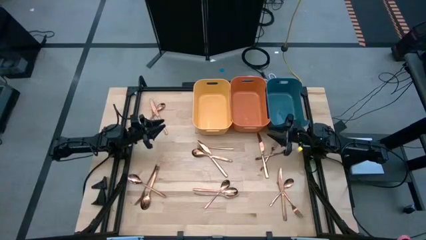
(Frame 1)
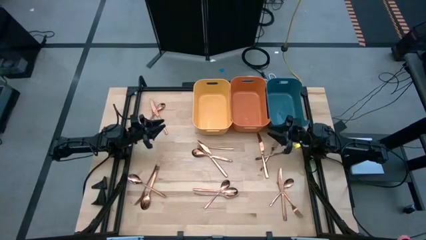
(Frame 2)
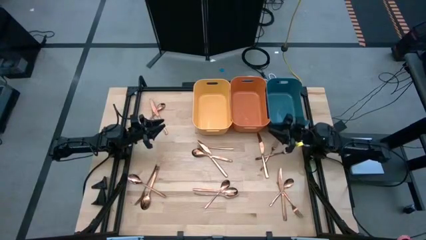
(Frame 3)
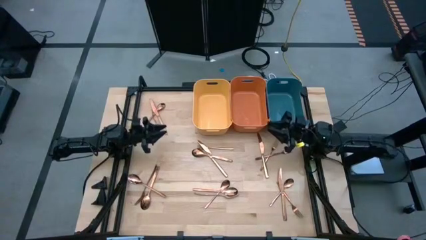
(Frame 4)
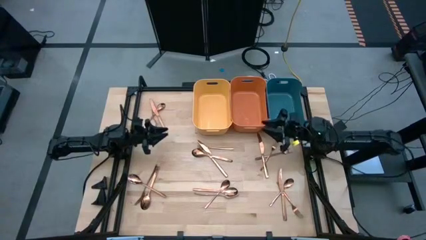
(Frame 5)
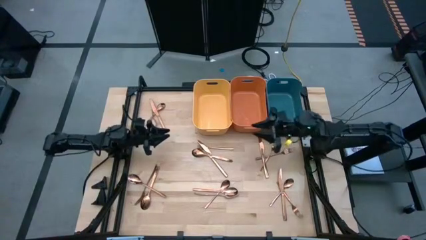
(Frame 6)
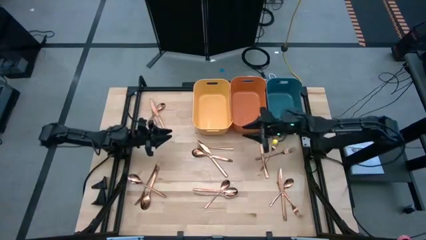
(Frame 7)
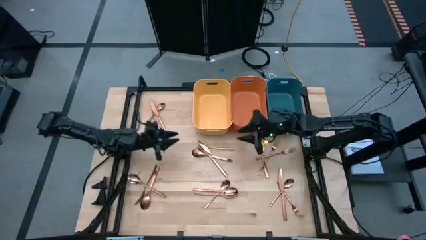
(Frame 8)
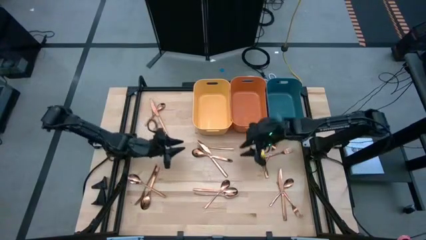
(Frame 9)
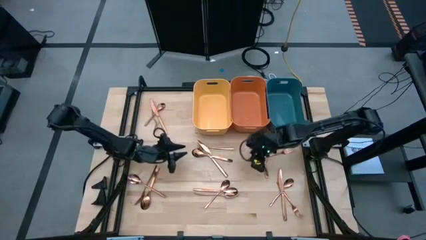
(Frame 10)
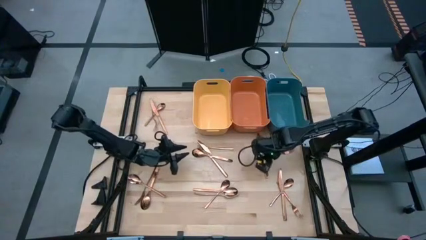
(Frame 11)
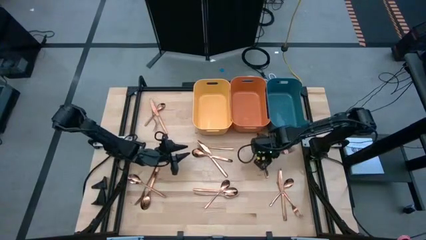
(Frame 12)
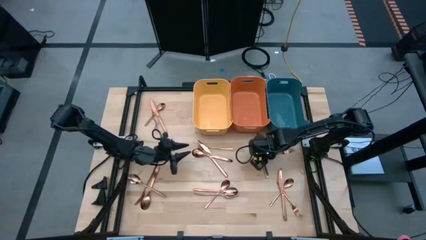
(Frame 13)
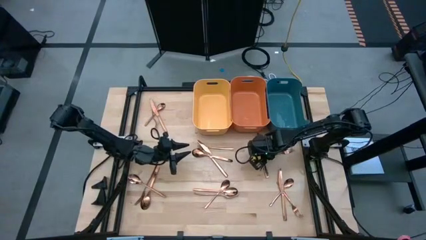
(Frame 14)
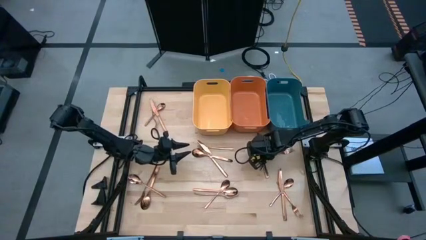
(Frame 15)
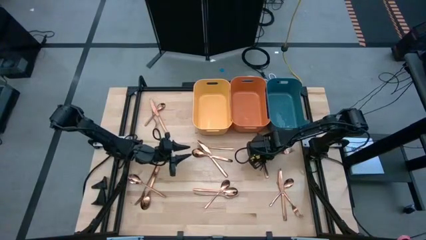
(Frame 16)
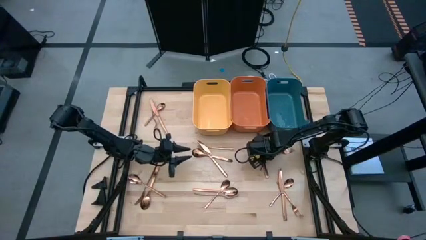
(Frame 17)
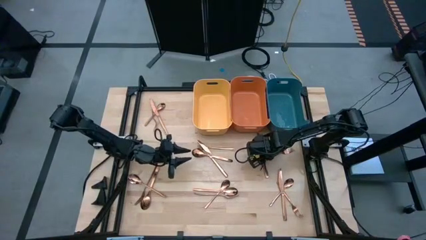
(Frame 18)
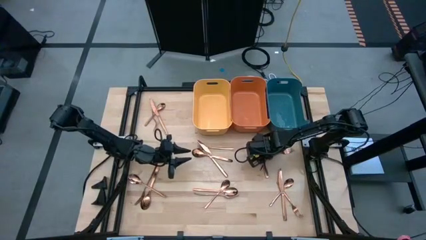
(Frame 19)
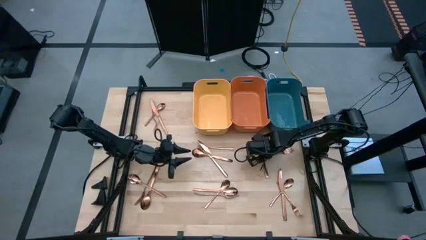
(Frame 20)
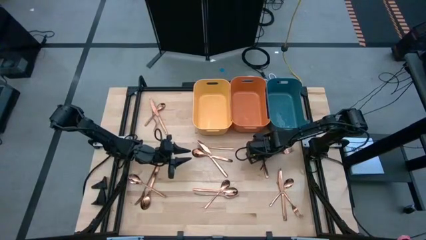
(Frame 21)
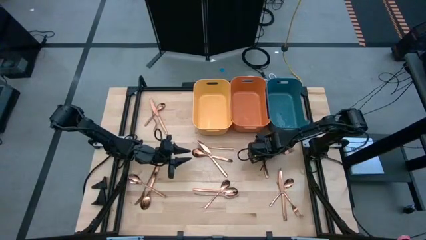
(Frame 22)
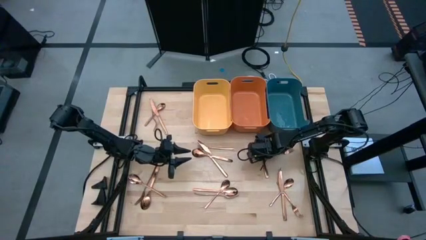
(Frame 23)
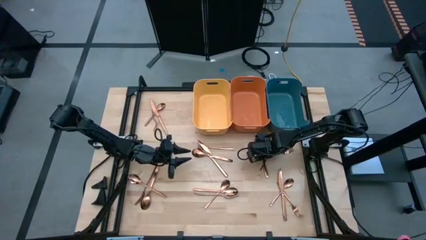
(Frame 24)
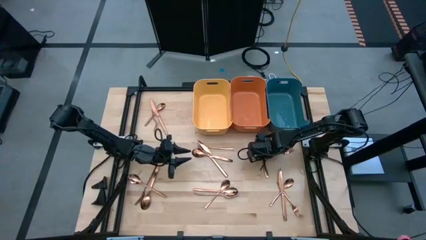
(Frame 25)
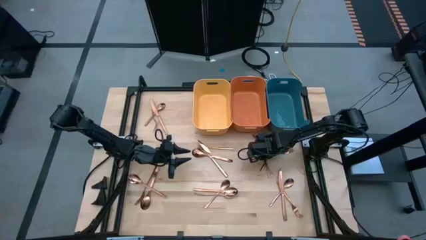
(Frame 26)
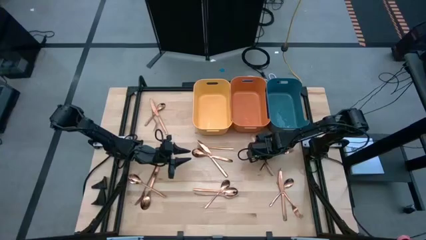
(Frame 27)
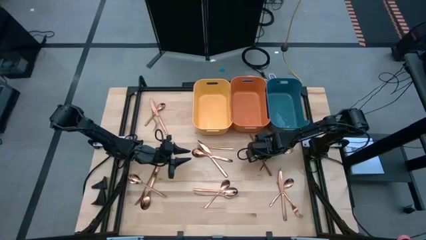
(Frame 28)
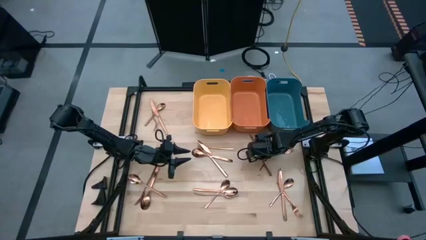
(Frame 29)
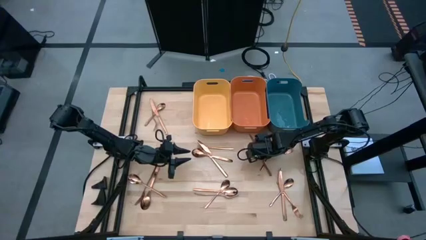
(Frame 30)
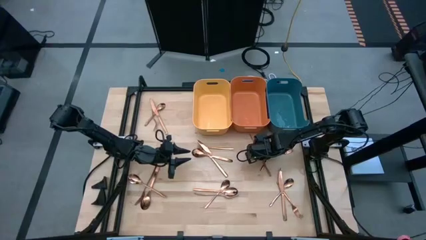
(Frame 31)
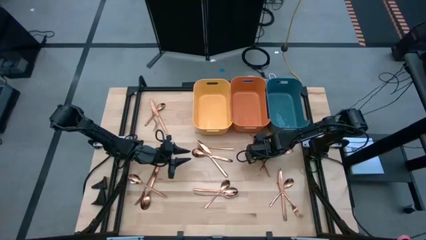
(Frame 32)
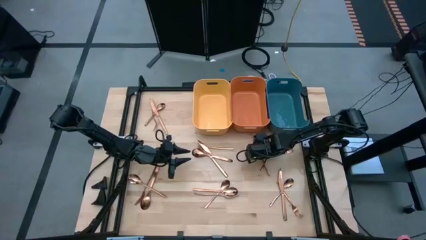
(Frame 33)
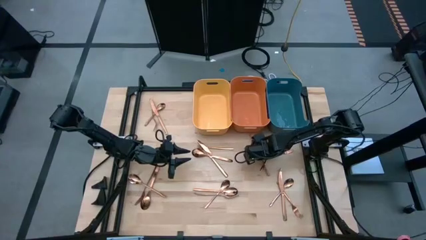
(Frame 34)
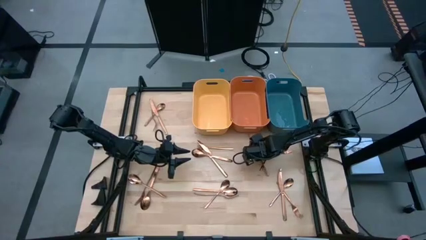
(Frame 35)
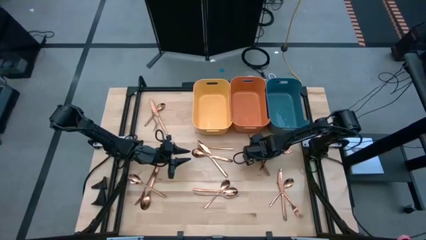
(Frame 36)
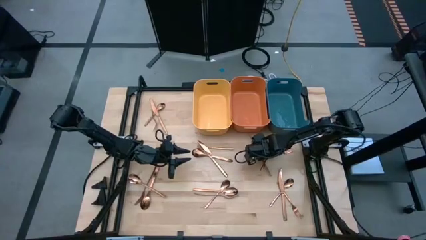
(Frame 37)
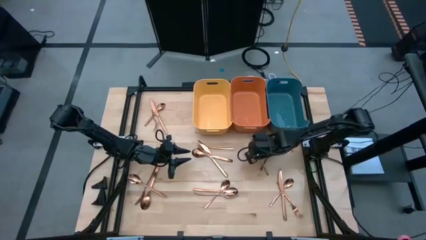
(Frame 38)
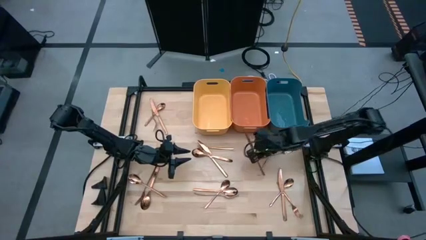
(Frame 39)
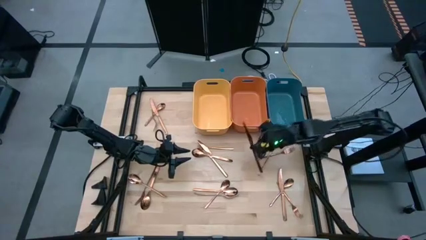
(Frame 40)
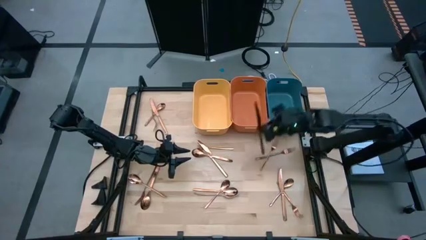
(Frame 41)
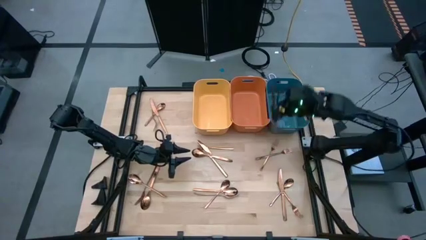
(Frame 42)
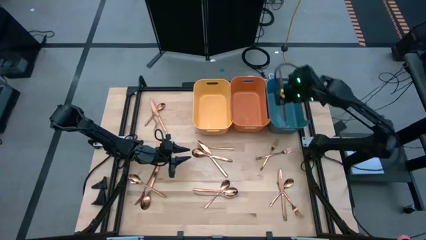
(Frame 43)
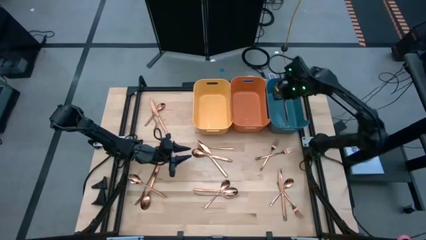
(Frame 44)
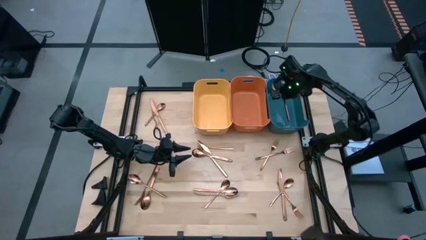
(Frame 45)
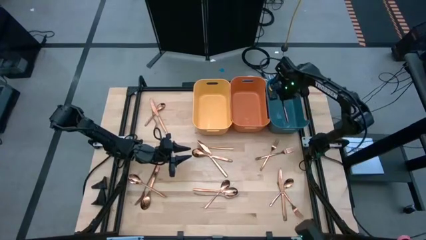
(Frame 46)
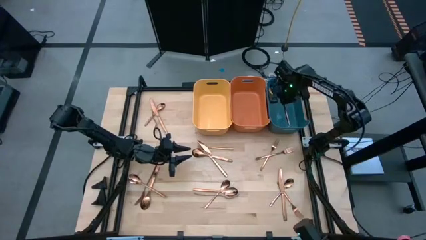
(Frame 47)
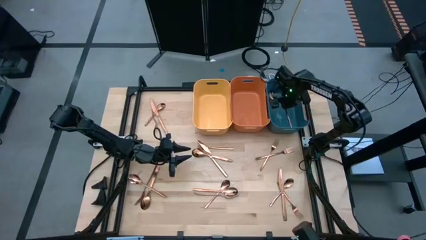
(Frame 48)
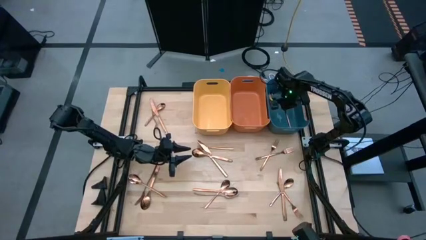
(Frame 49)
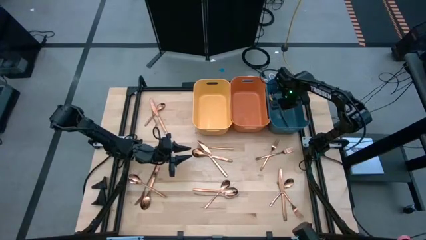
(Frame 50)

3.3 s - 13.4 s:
Task: Sort silverware
Put the copper knife into the blue bin
